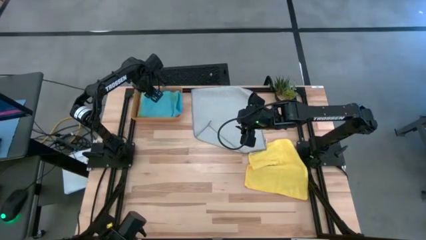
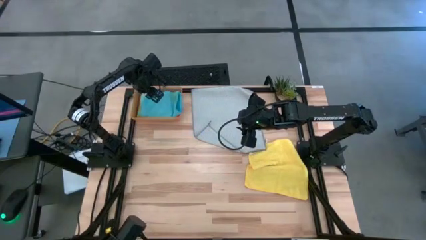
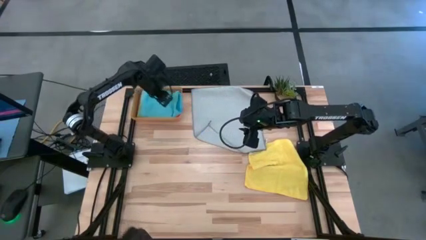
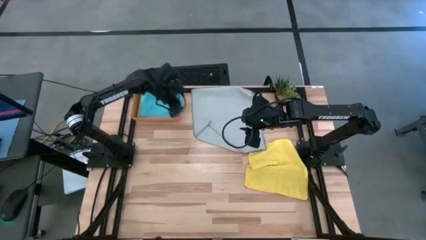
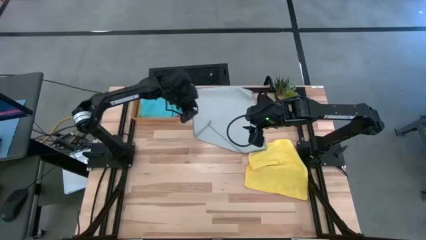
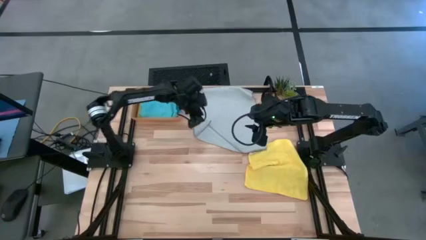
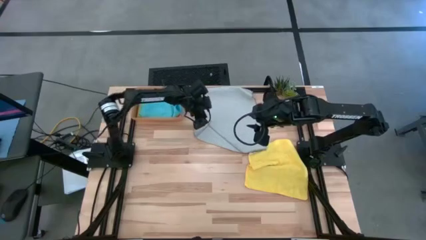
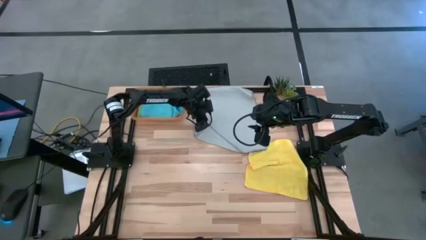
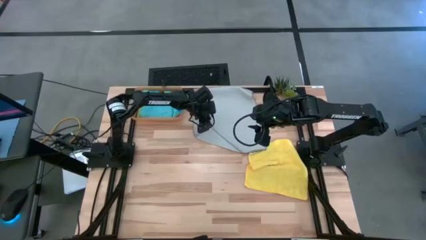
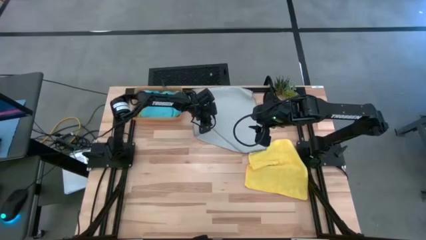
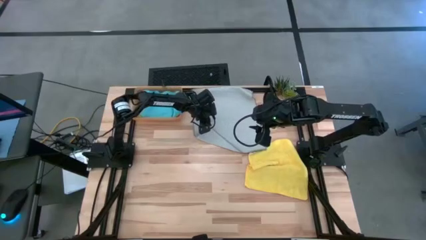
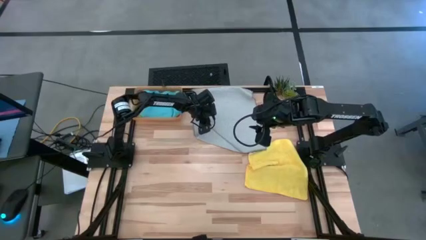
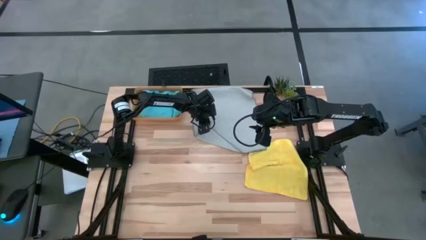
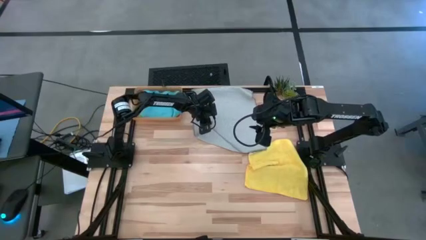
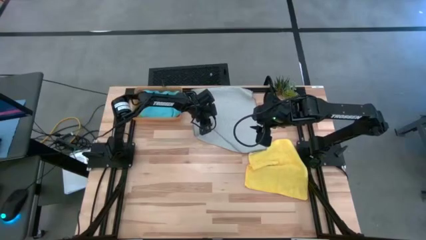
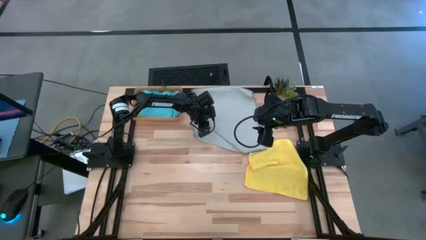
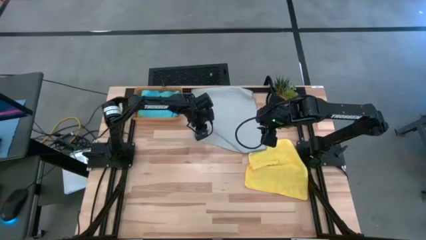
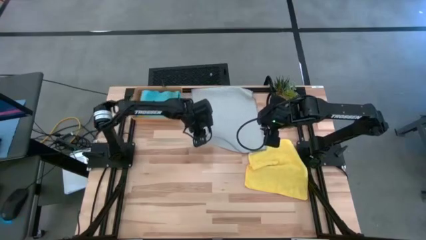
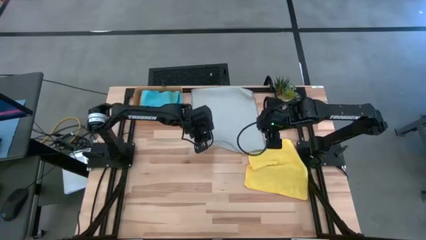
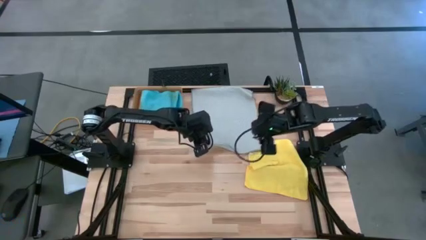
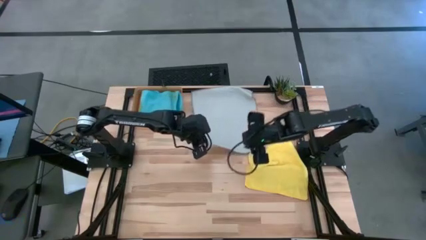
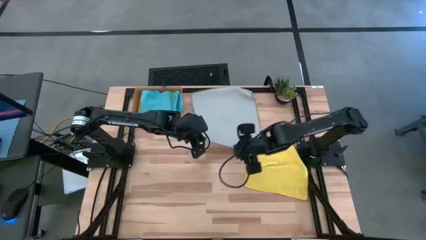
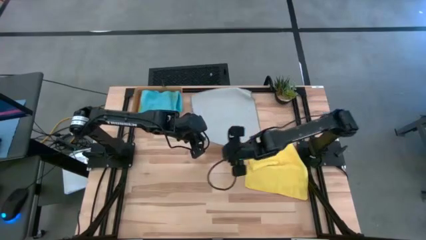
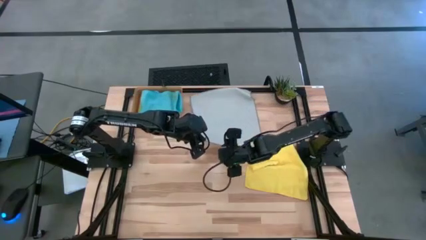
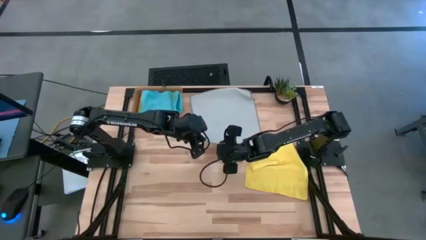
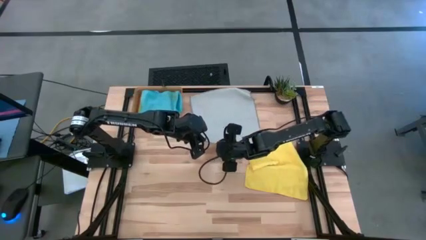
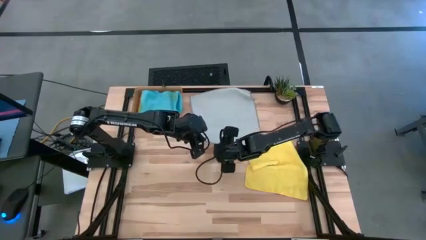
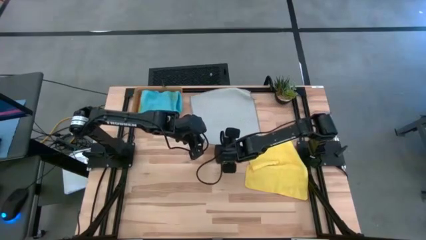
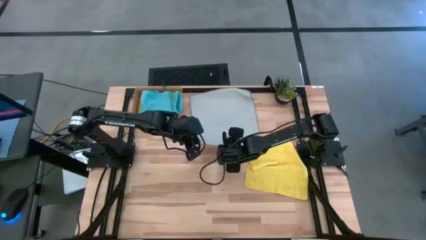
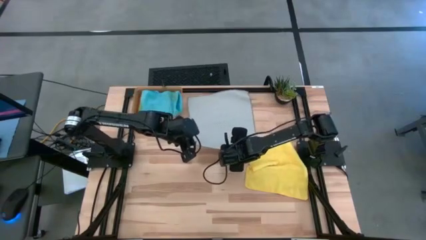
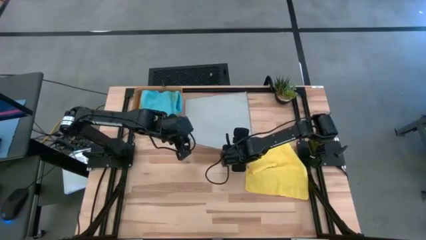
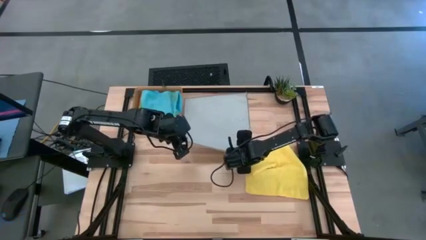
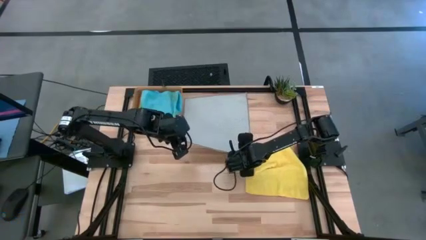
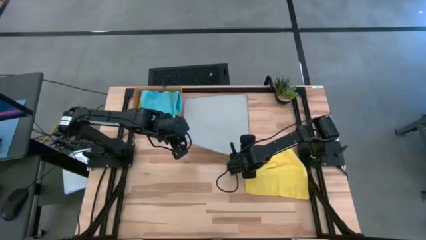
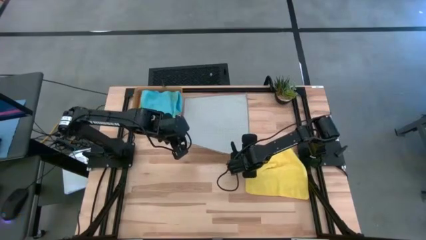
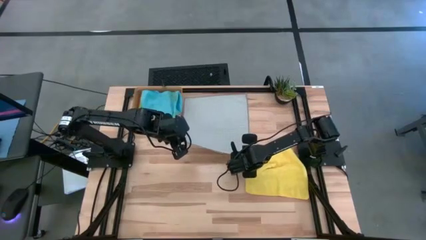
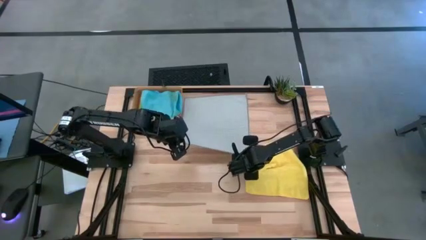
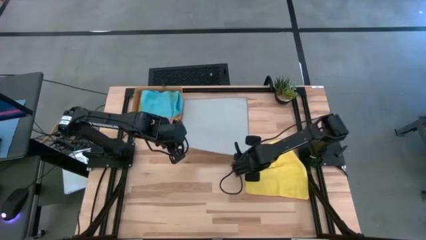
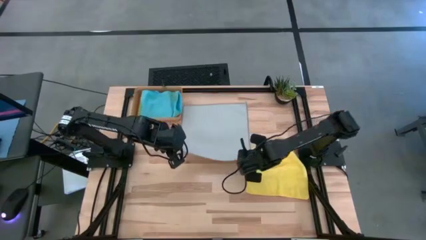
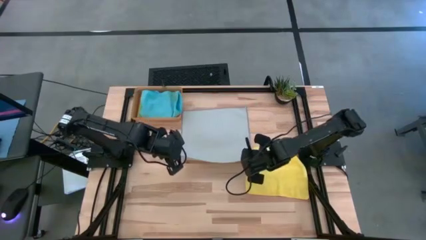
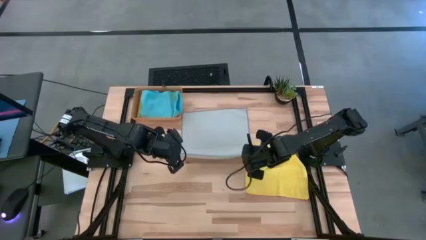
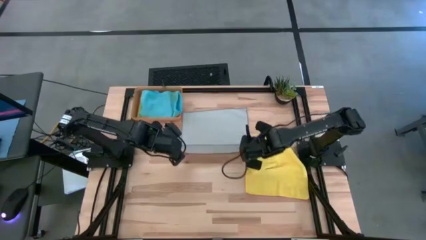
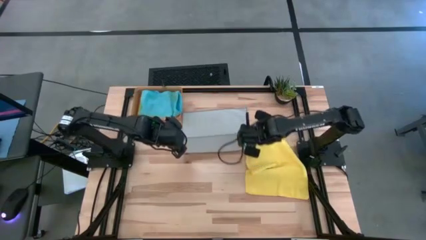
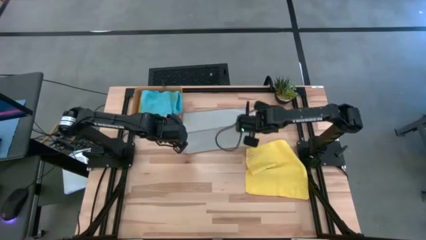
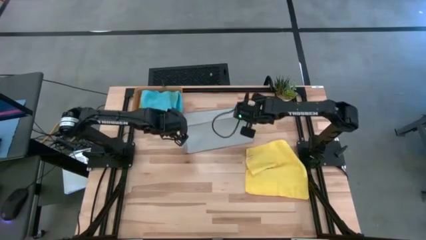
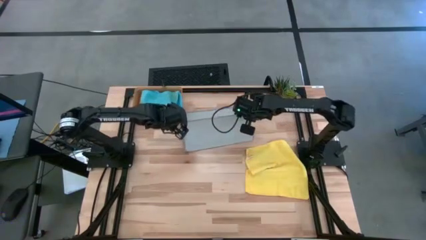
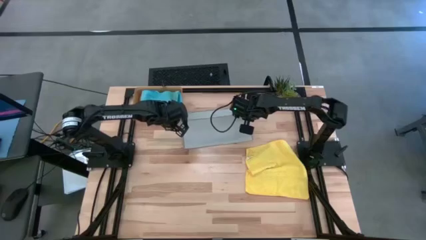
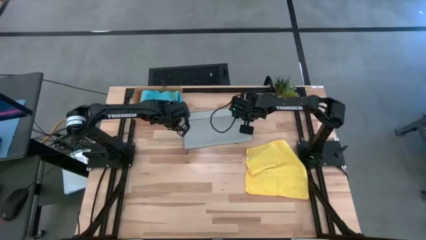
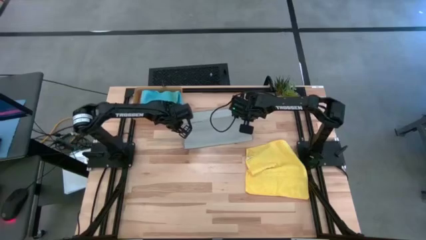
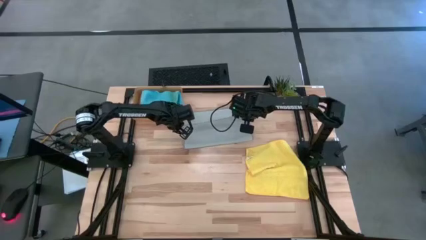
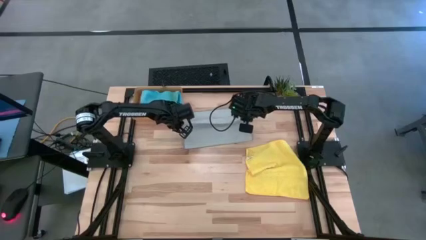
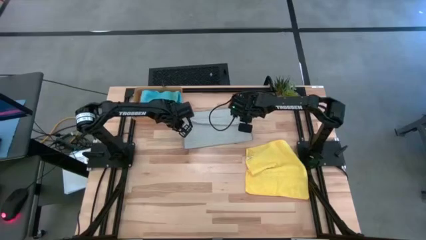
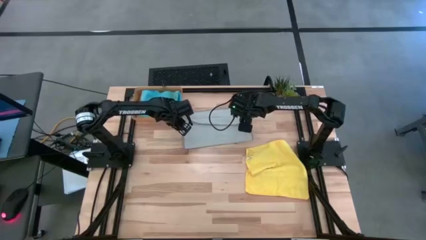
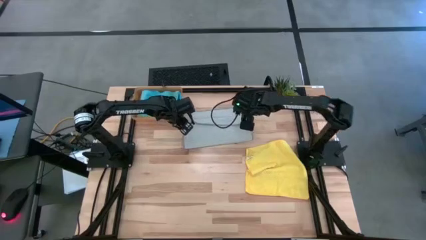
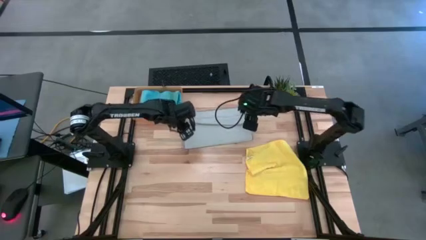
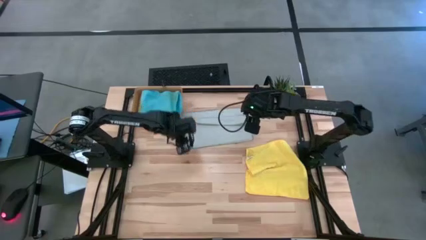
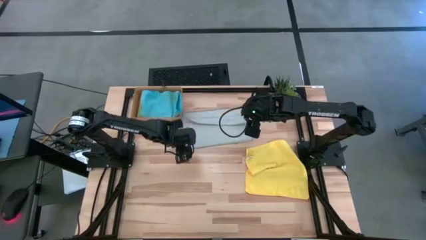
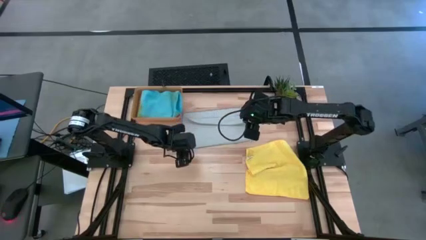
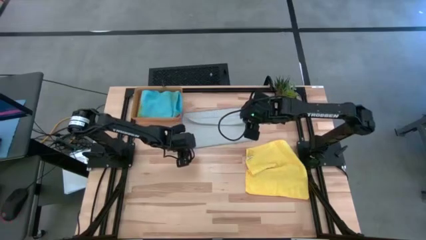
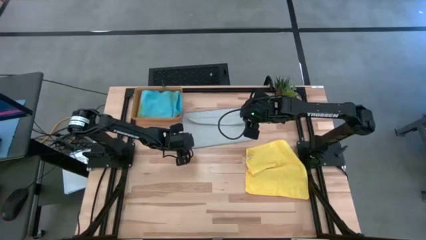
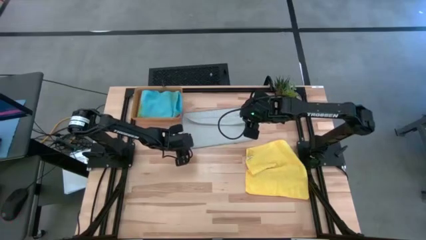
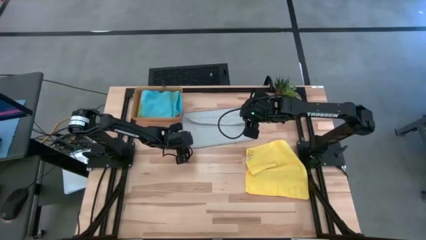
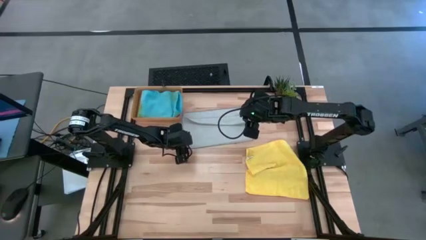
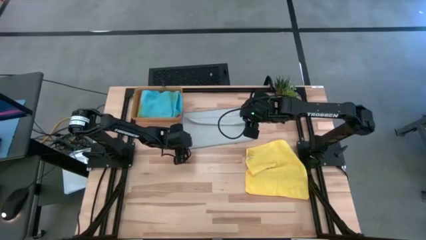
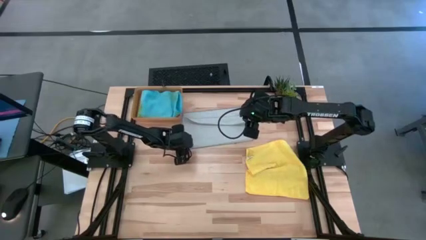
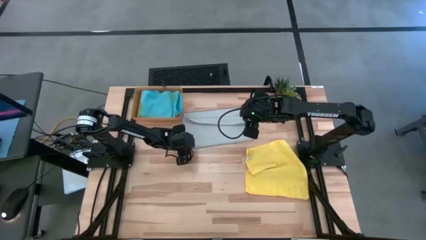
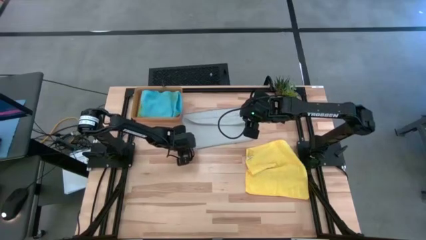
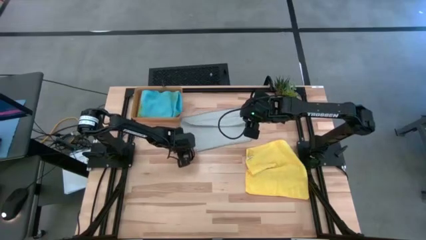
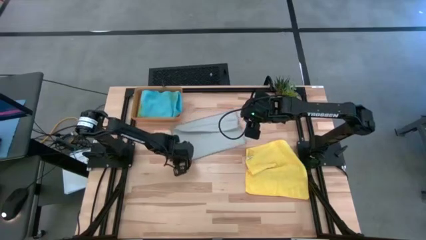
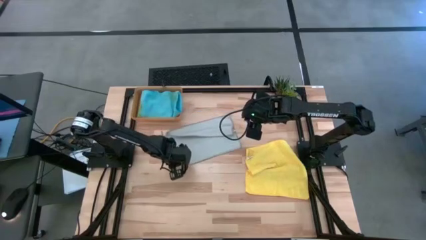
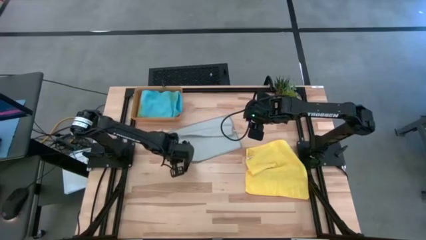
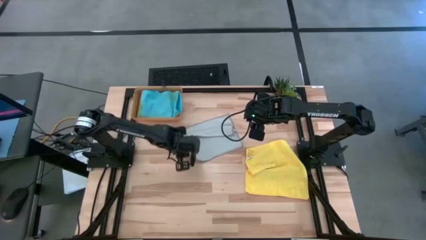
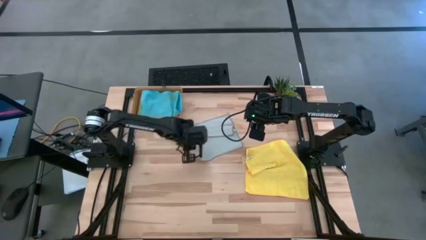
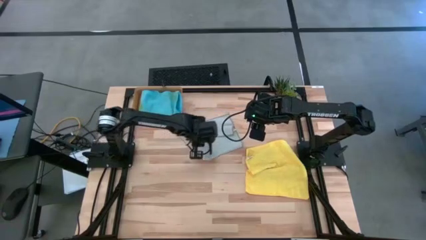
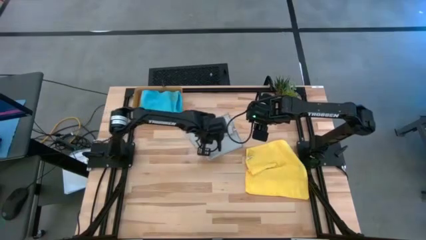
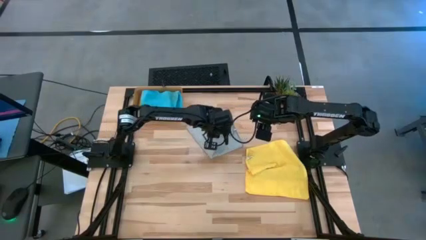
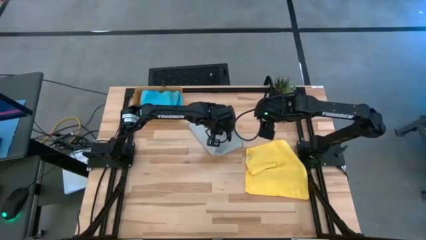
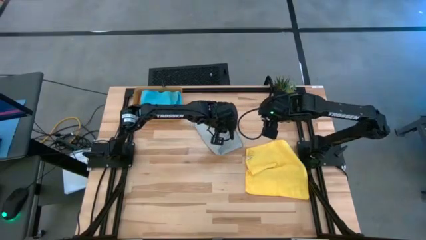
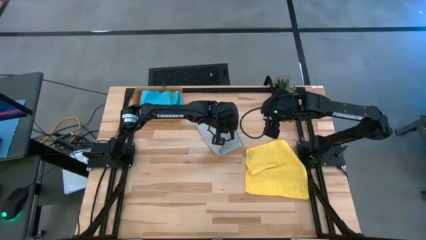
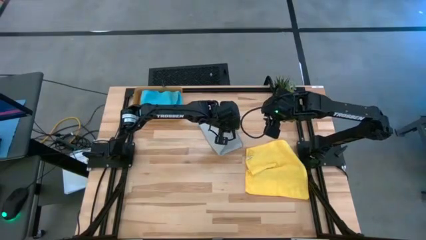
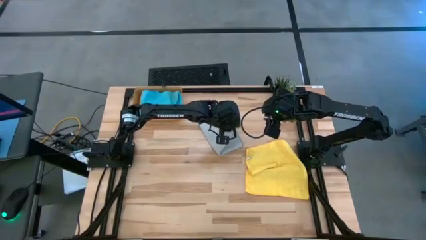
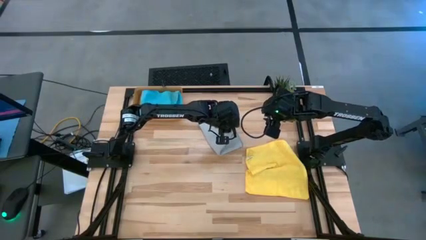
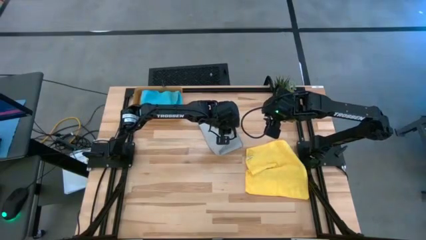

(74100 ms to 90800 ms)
Task: Fold microfiber towels
Fold the gray microfiber towel
